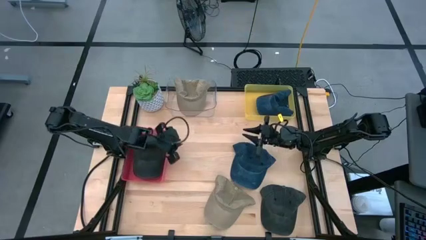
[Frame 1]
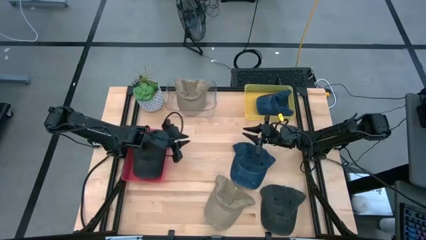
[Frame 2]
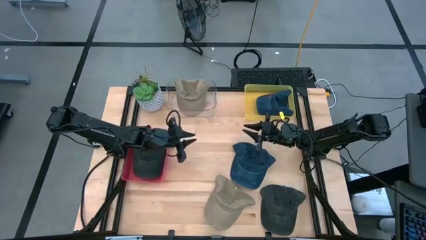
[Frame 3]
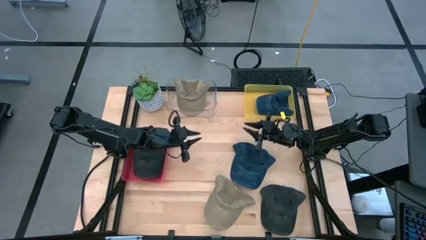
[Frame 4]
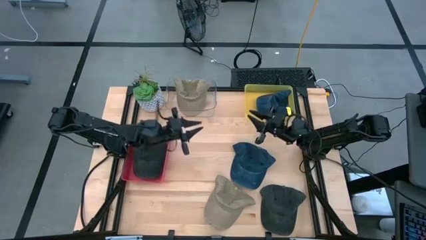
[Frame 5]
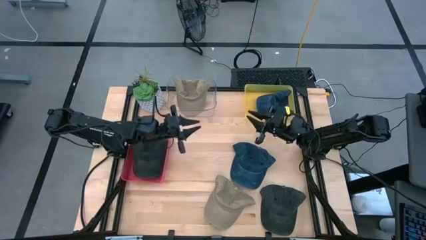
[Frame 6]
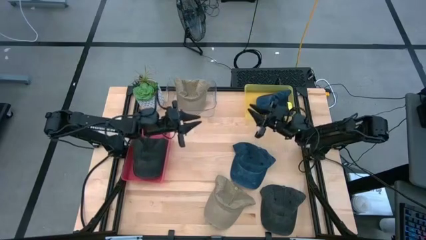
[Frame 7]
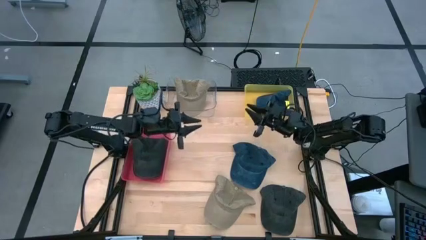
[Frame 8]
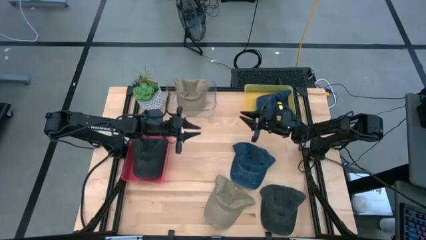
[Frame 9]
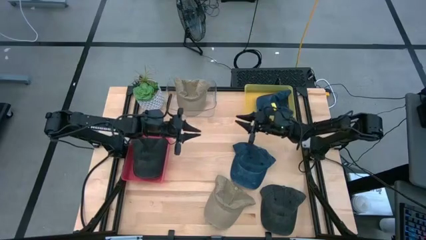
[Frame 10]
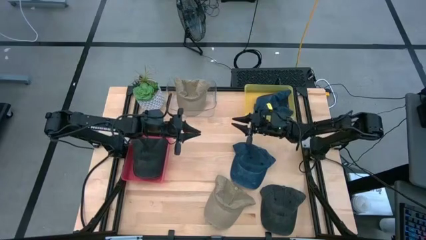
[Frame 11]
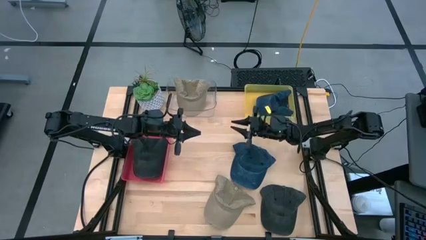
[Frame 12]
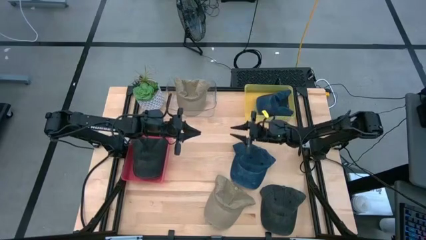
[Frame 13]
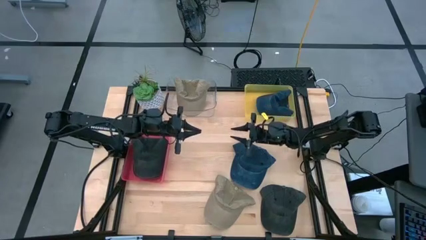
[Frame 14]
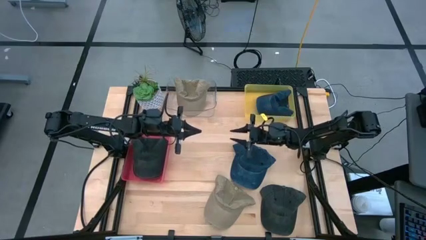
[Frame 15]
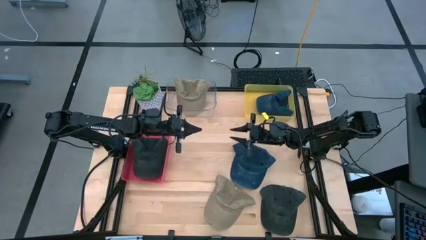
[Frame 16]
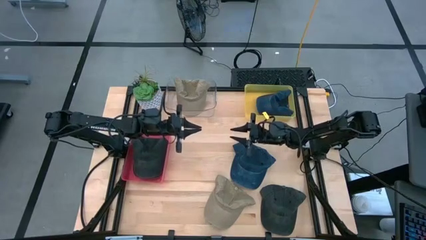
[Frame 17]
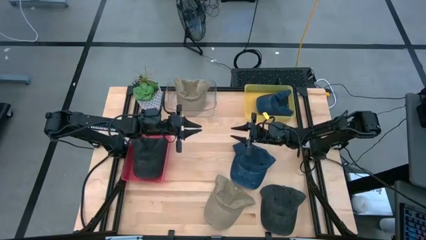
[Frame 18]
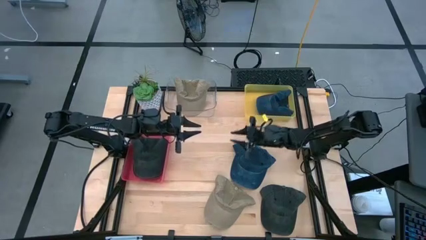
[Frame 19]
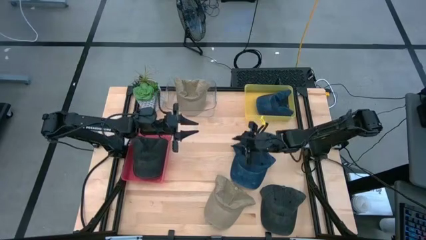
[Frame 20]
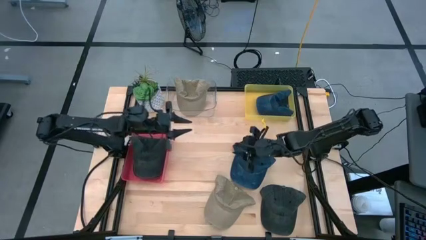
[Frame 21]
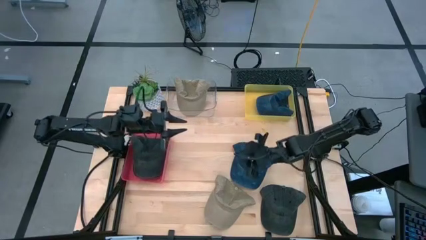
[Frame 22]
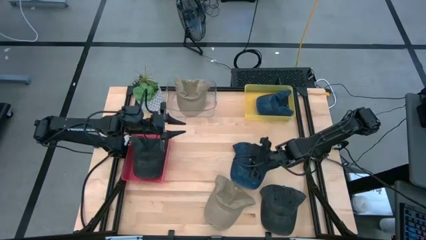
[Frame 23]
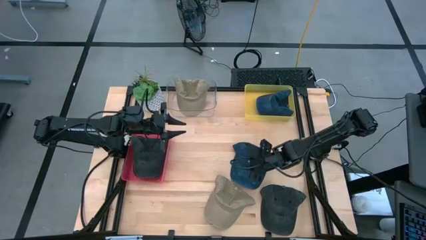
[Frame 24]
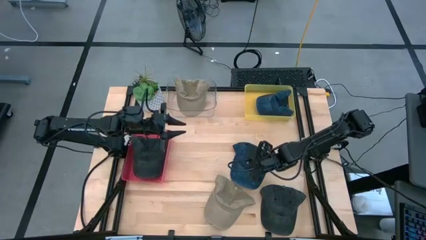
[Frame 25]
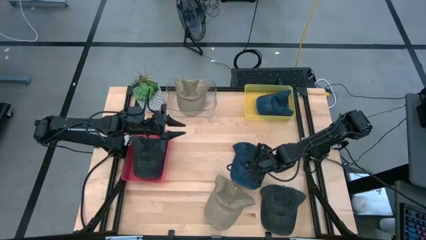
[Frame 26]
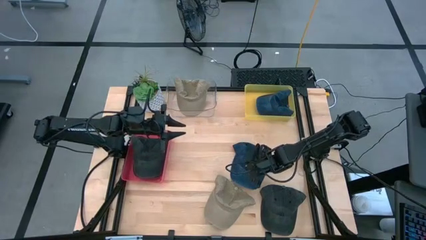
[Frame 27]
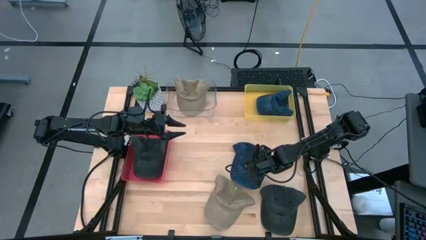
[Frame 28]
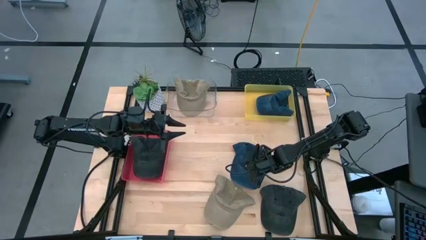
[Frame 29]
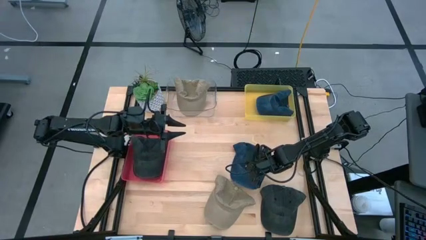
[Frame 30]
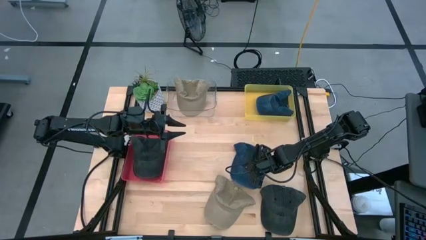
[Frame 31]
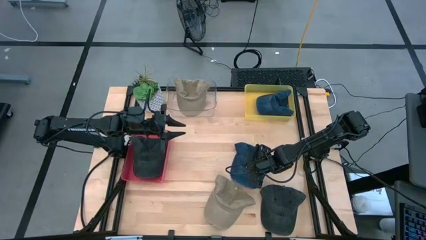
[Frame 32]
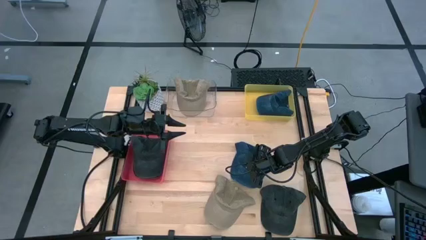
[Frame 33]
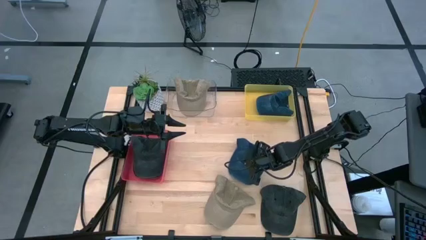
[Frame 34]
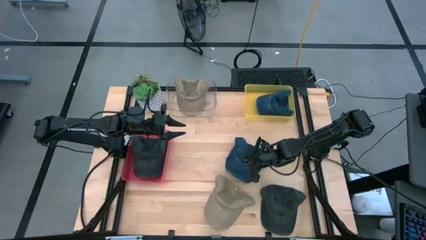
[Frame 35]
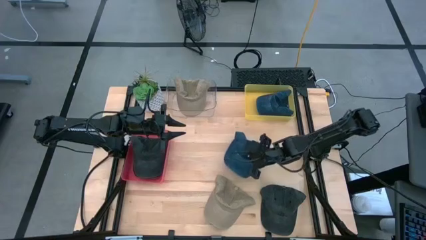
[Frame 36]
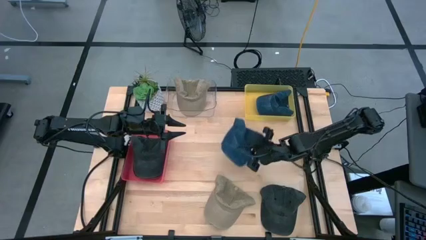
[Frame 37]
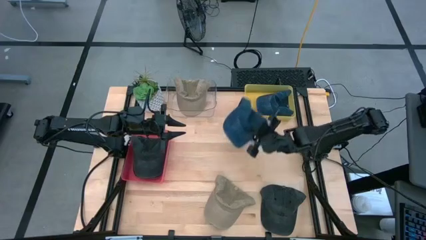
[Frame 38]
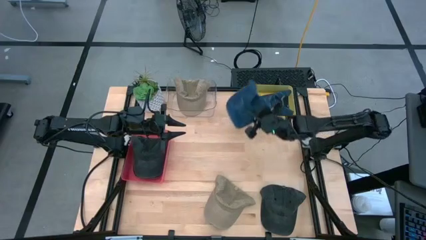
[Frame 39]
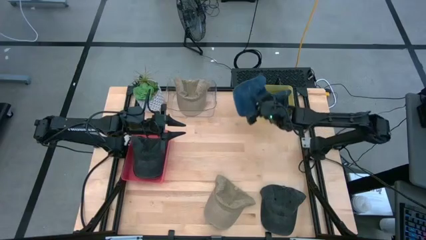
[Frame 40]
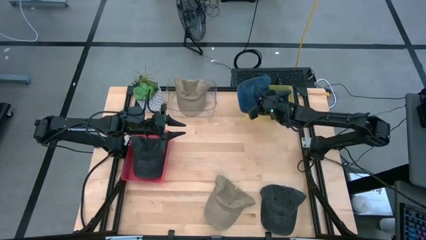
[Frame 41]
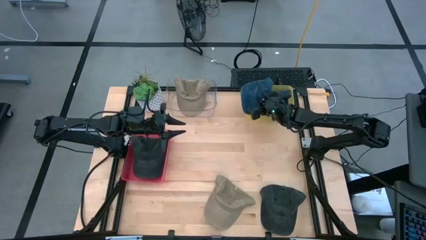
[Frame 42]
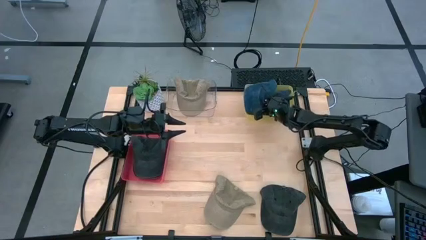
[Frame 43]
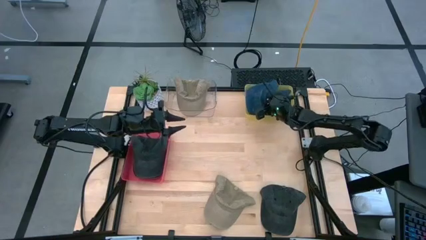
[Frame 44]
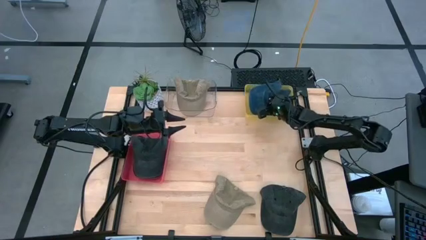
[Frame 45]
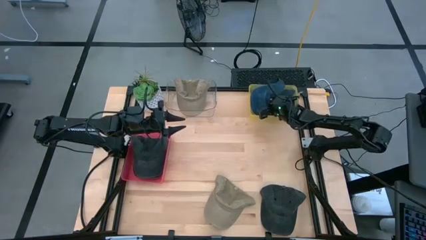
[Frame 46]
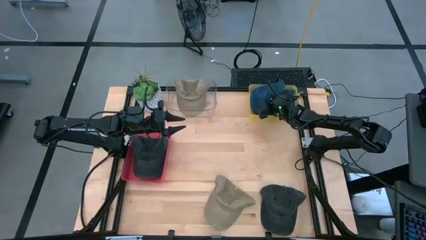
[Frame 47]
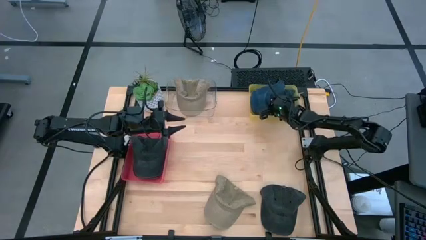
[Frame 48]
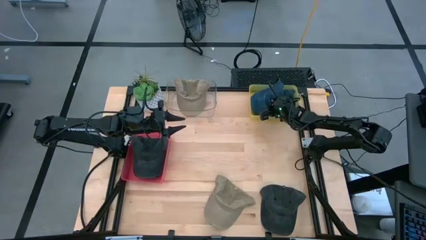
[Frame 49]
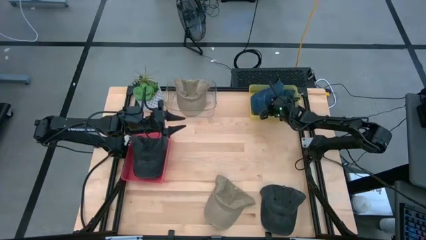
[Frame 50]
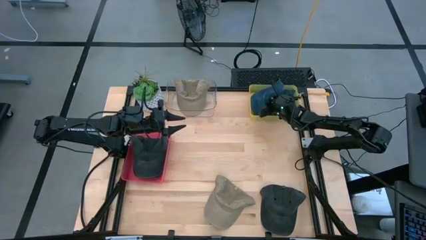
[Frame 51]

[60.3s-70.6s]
Task: Pick & Place hat
Put the blue cap into the yellow bin

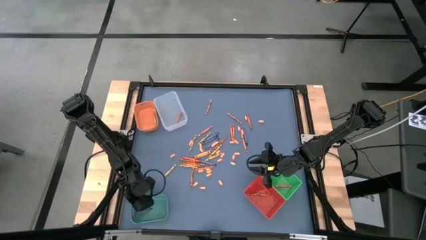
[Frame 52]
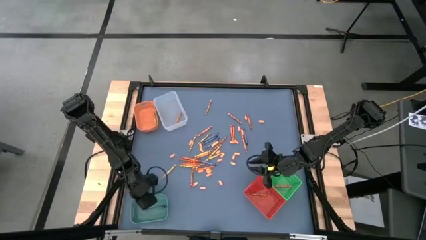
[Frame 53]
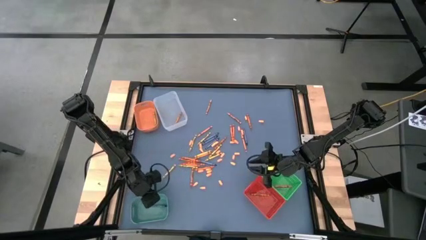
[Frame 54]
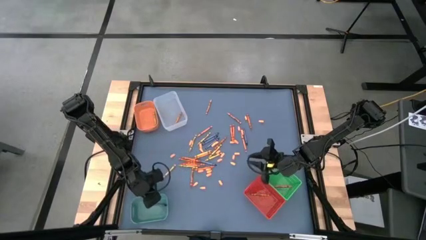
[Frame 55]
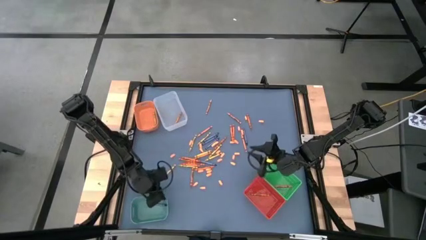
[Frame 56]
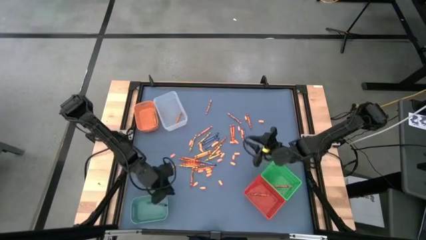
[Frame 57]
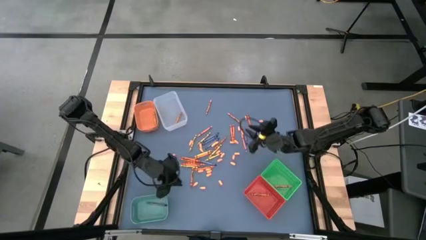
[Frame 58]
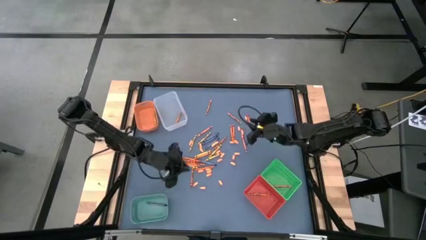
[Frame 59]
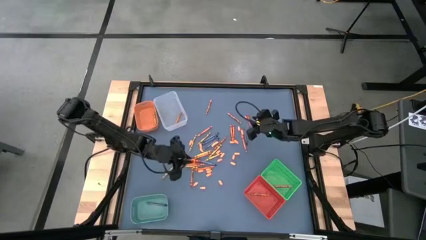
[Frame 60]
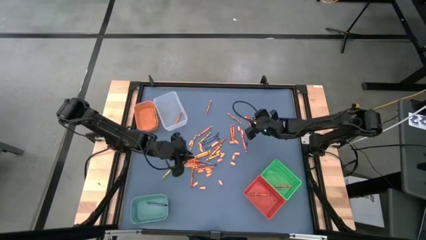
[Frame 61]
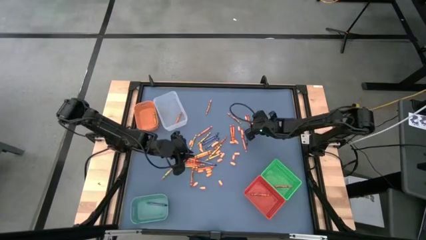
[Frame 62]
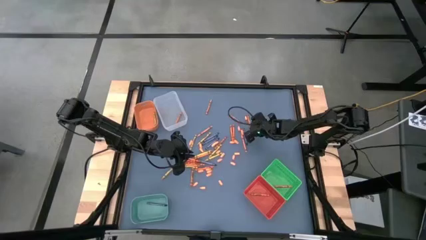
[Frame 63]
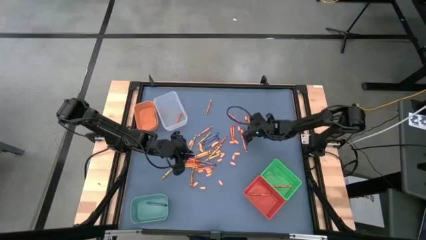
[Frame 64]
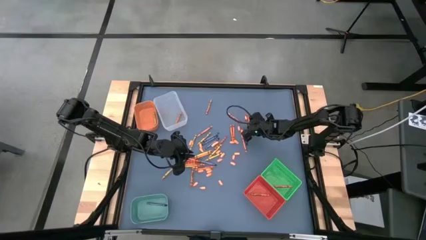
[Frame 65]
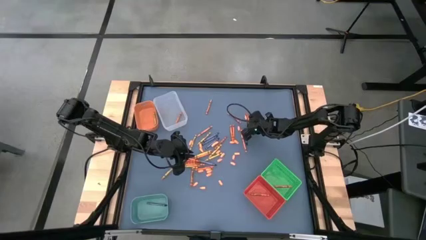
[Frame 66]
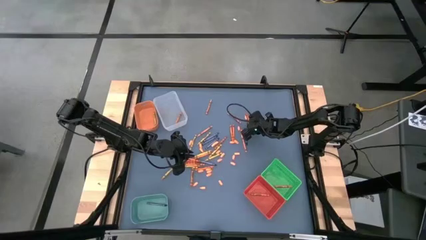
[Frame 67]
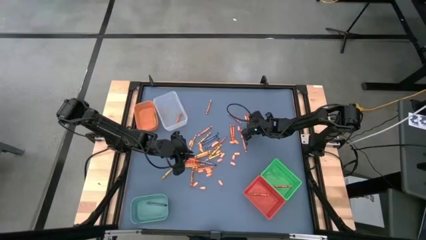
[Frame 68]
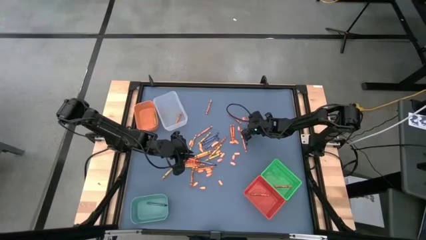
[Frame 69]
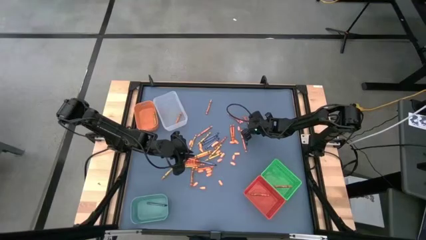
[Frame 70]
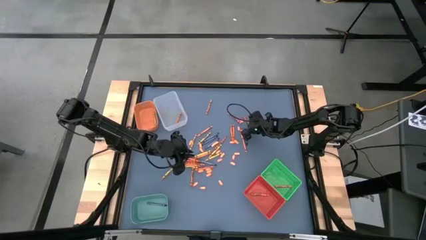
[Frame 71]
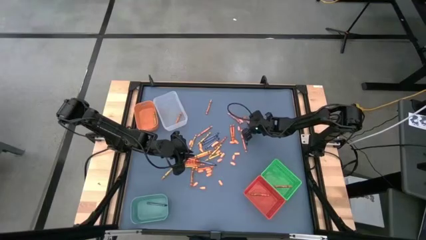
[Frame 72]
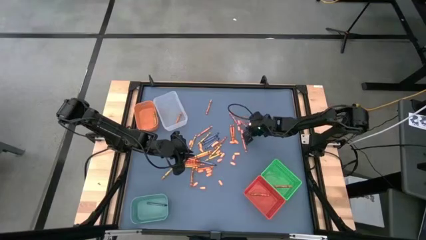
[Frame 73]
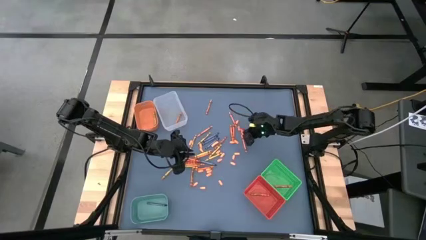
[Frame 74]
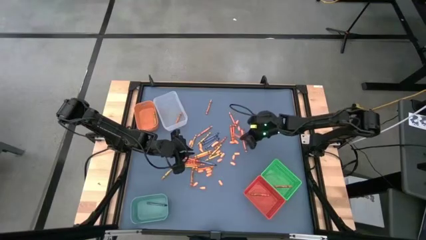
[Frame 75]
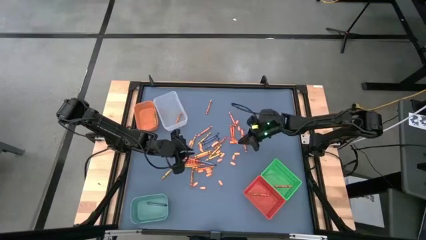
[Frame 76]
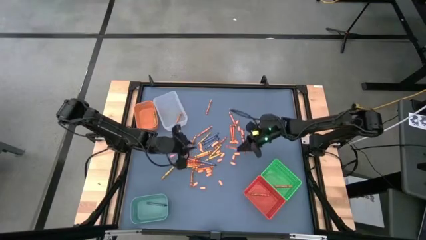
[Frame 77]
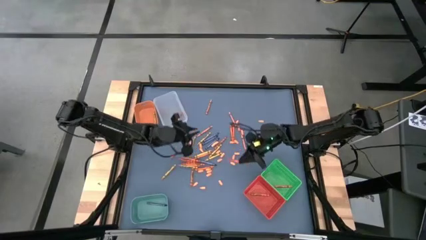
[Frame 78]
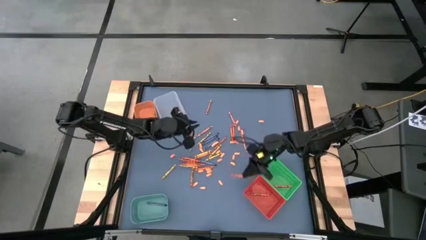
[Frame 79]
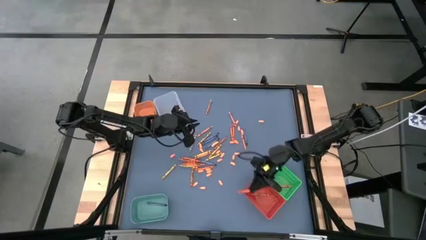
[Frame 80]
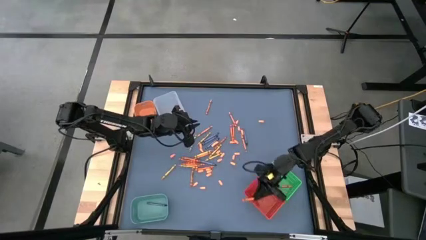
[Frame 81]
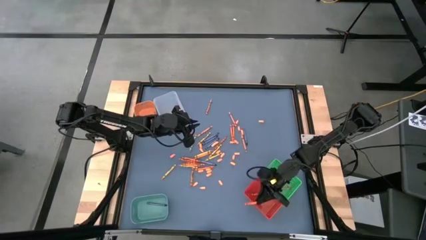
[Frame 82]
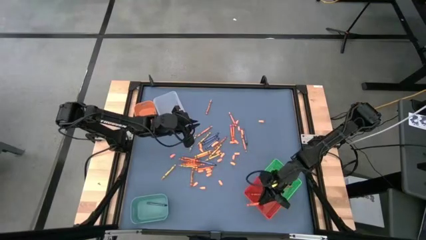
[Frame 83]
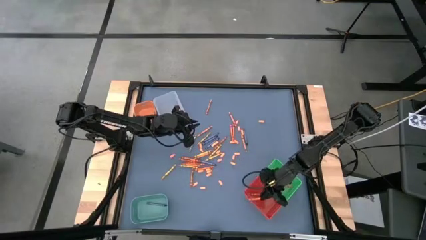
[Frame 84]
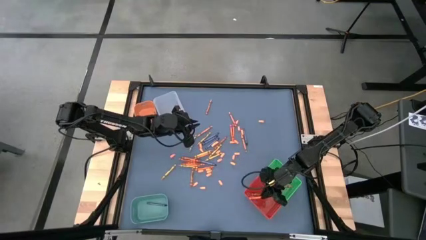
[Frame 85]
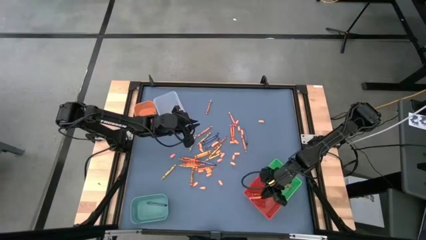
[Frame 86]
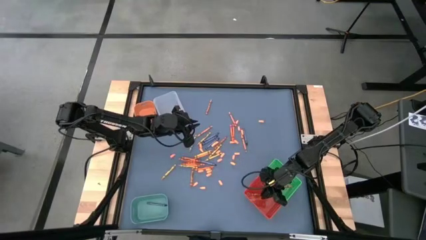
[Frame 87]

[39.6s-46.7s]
Task: Sort crayons
Put the red crayon into the red bin
